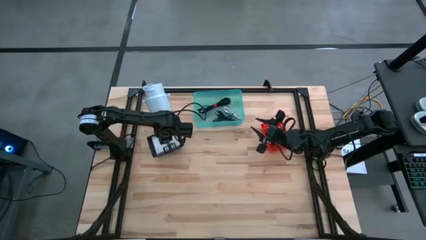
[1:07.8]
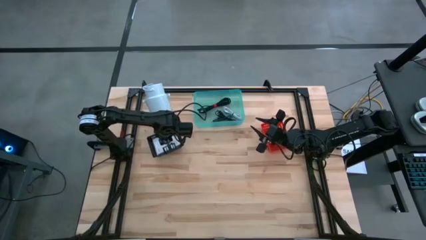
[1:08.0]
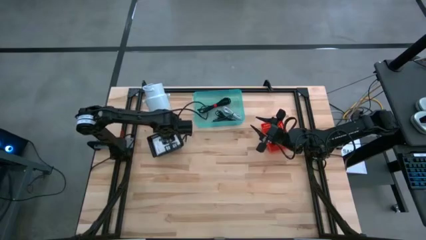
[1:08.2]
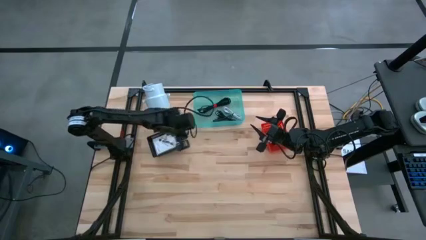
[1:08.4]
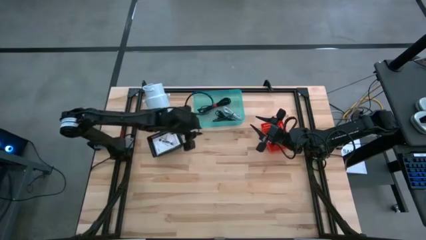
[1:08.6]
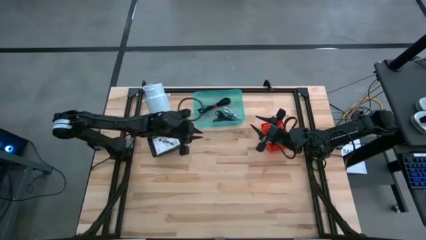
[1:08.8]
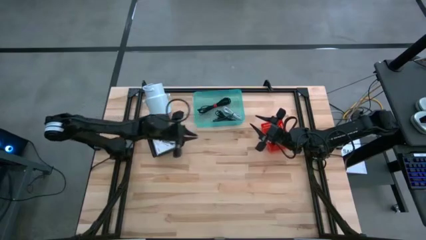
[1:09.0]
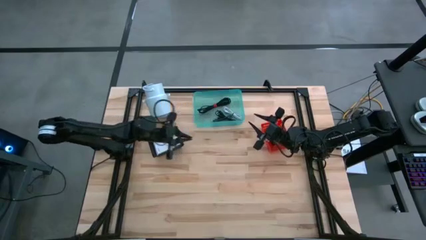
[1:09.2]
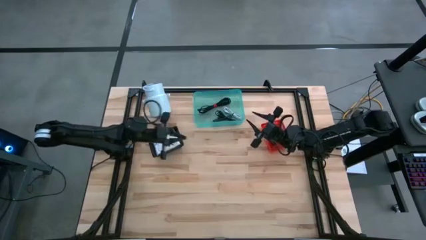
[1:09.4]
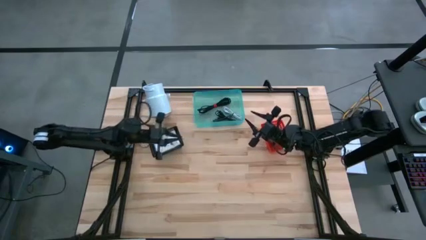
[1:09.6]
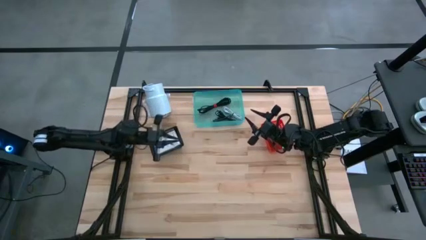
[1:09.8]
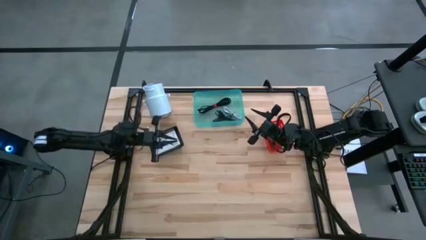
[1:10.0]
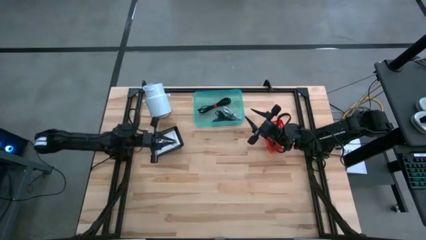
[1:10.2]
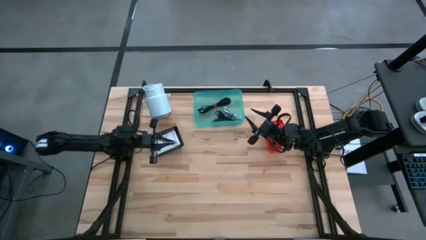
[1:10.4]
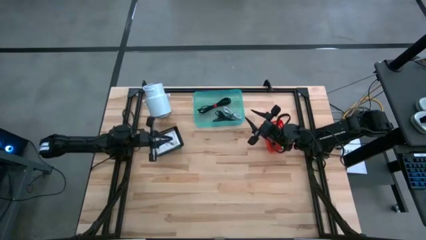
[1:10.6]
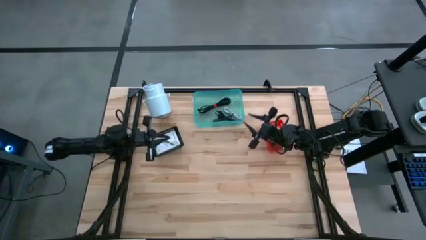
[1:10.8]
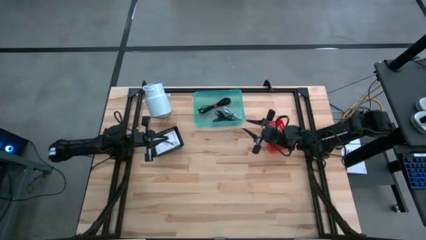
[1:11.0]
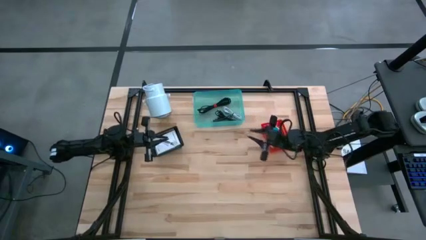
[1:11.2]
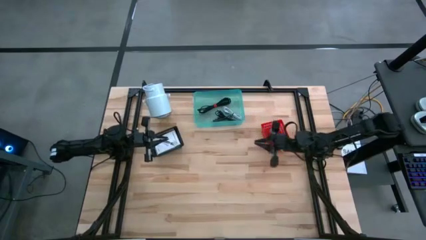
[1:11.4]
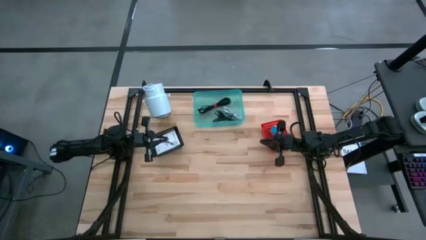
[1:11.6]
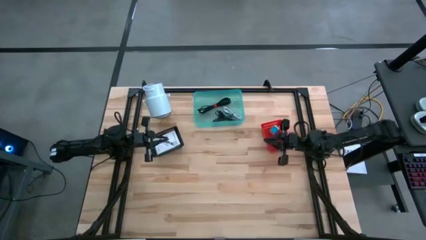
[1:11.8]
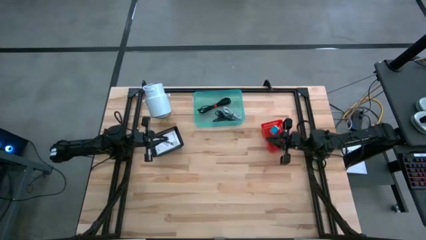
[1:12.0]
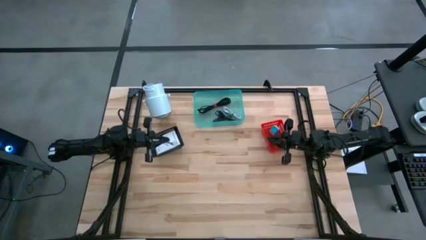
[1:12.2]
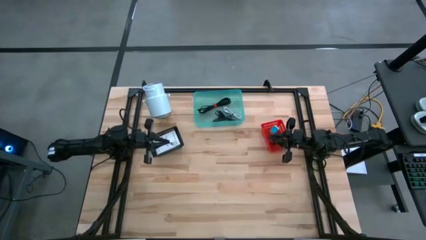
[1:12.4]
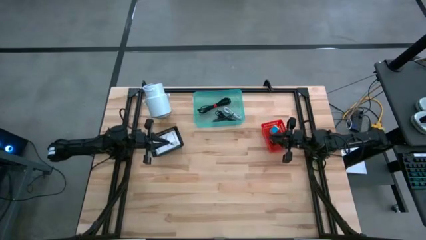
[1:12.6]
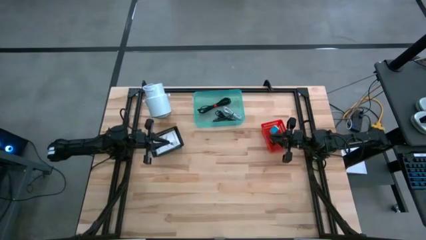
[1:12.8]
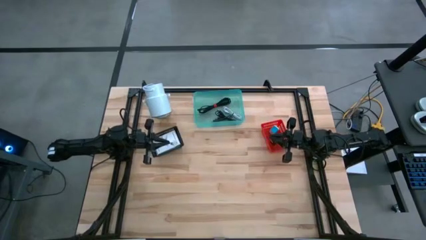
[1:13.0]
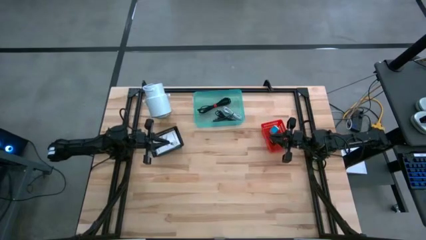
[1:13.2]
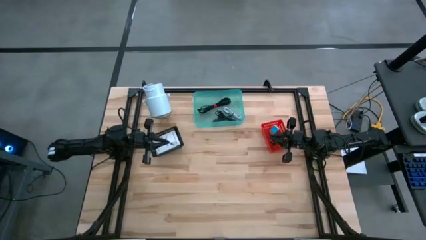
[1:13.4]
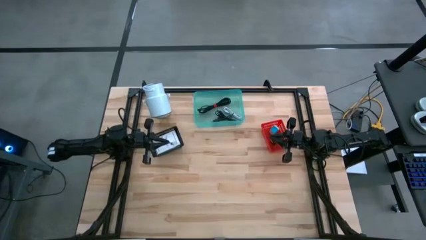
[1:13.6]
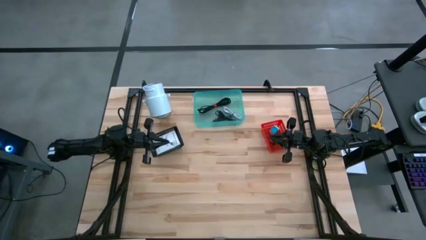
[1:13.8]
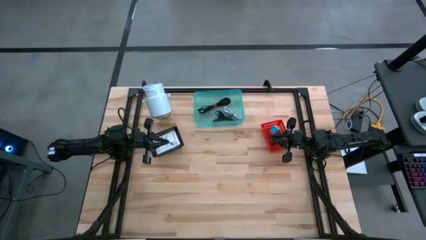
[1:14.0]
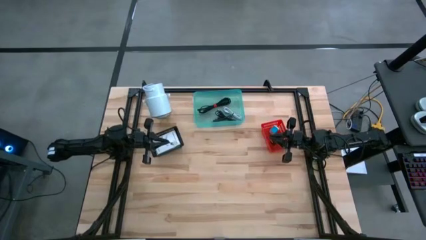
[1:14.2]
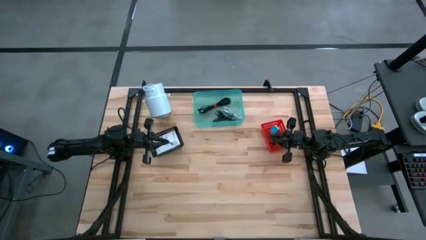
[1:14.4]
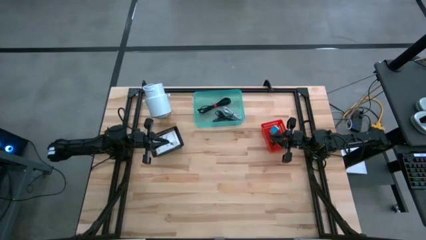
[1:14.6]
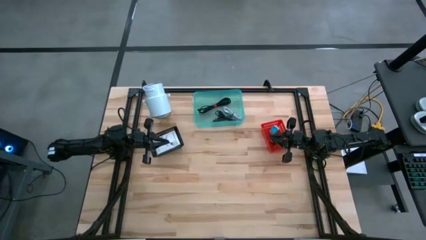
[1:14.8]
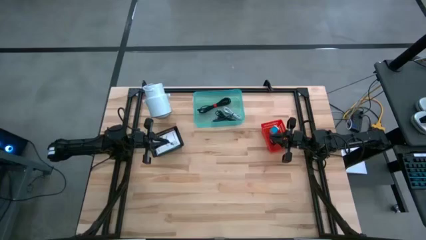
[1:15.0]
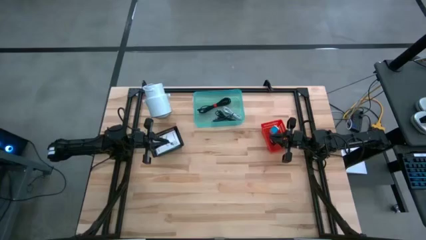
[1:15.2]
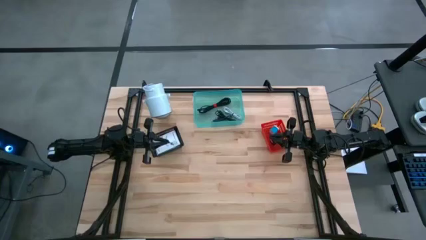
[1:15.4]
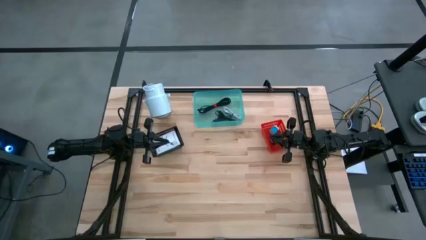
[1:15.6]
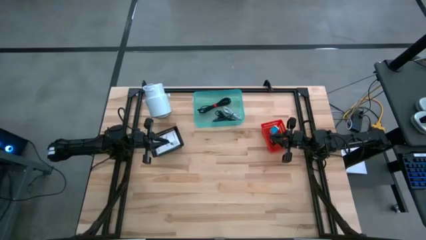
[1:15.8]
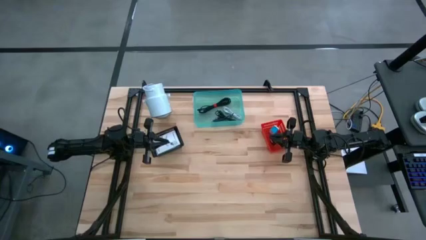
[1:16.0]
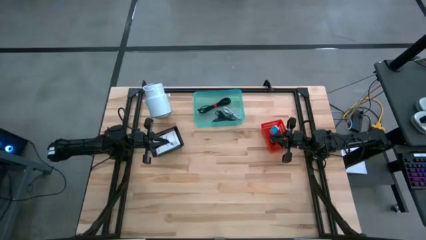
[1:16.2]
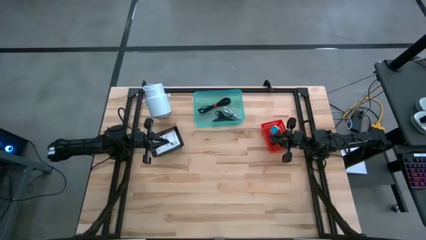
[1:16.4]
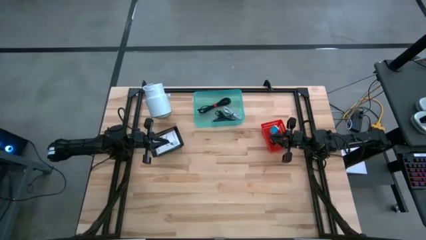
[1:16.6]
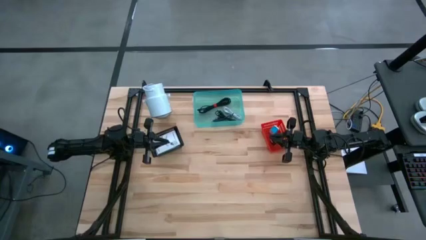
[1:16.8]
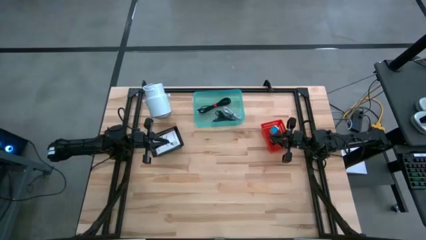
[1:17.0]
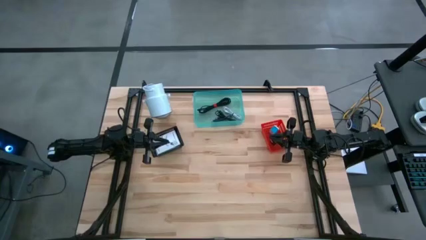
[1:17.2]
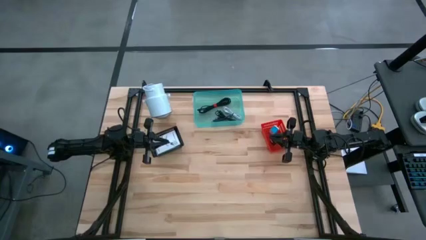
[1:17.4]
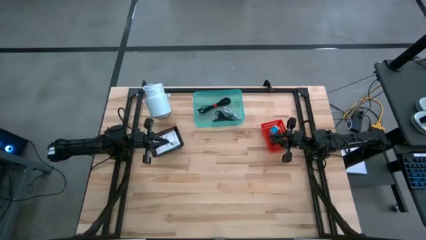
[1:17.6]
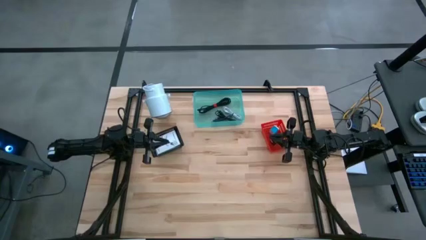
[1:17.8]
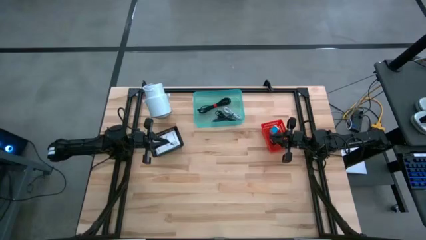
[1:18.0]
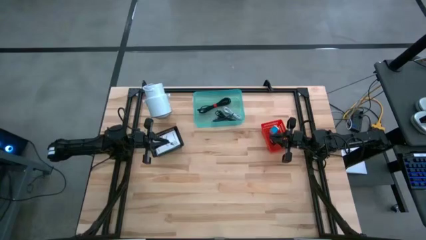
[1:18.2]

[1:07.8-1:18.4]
Task: Pick and place items into bin
Return to Home Position
